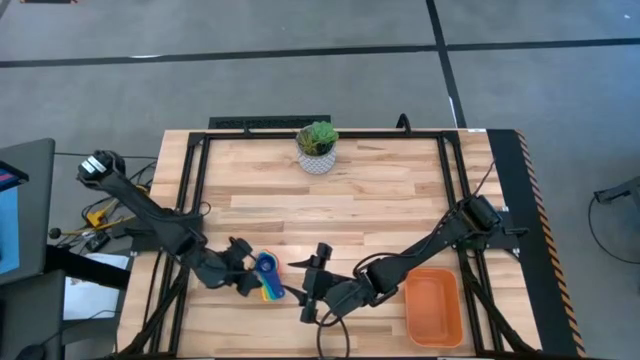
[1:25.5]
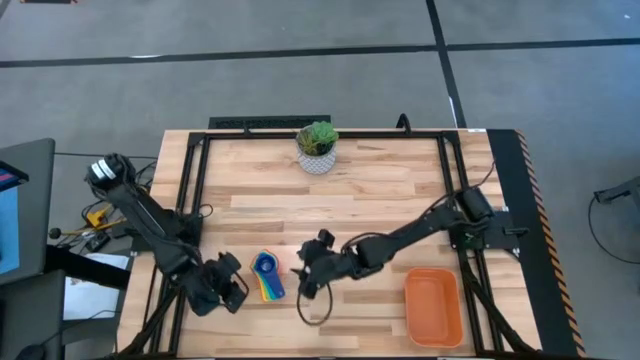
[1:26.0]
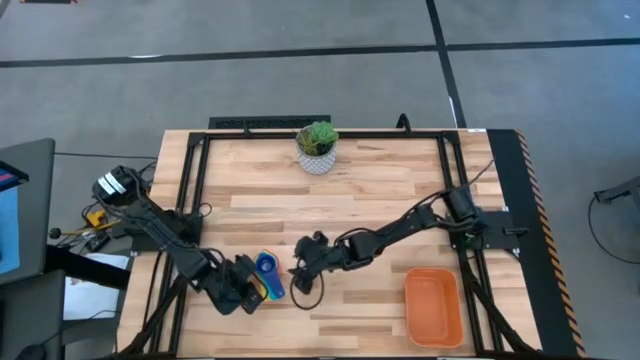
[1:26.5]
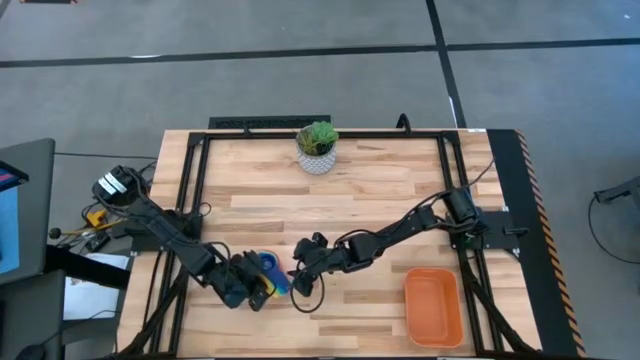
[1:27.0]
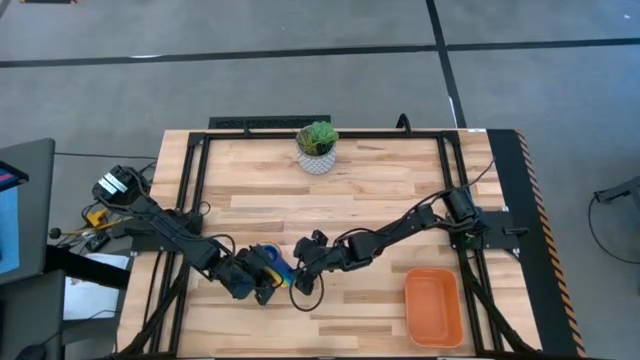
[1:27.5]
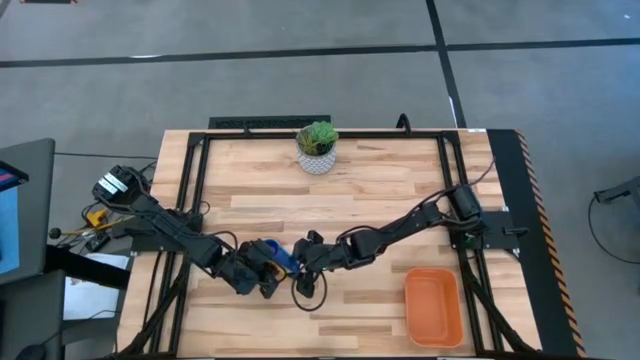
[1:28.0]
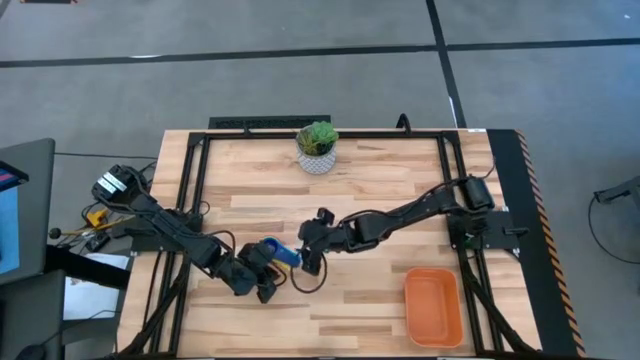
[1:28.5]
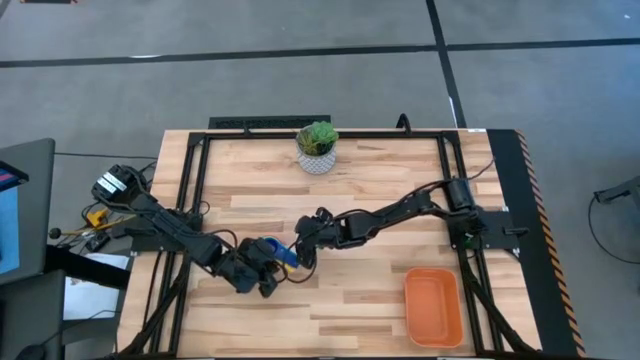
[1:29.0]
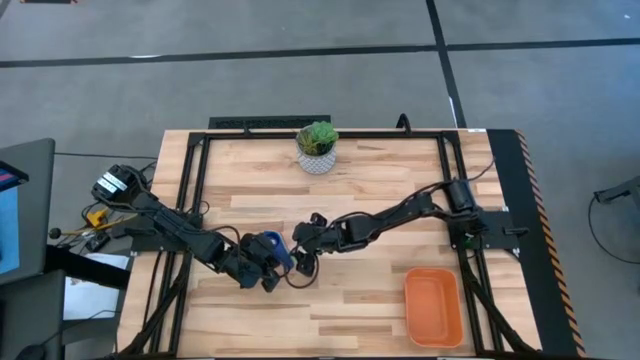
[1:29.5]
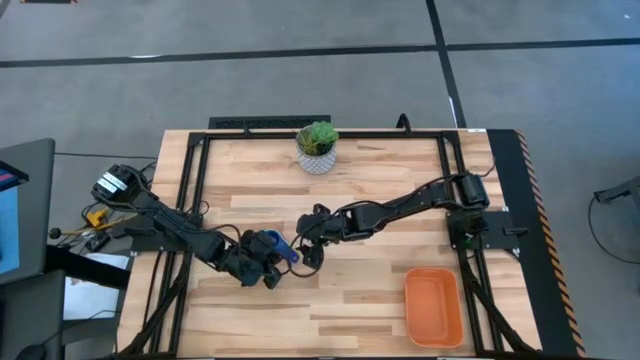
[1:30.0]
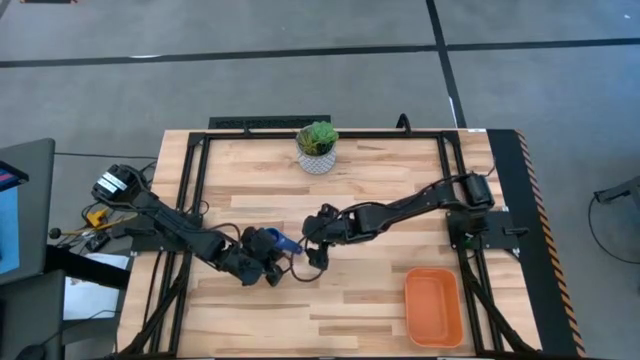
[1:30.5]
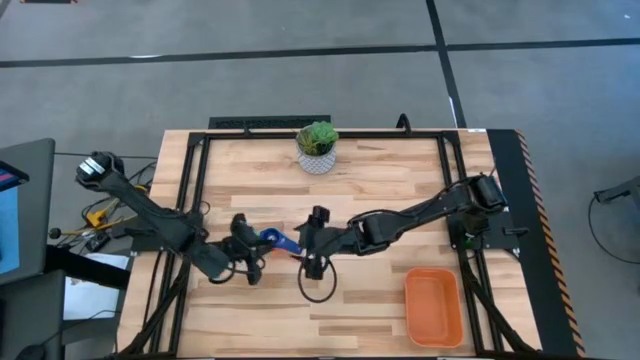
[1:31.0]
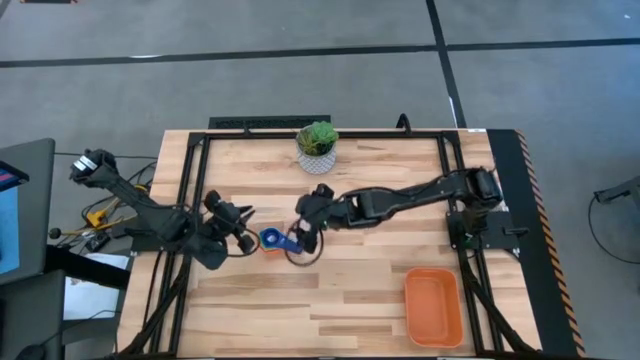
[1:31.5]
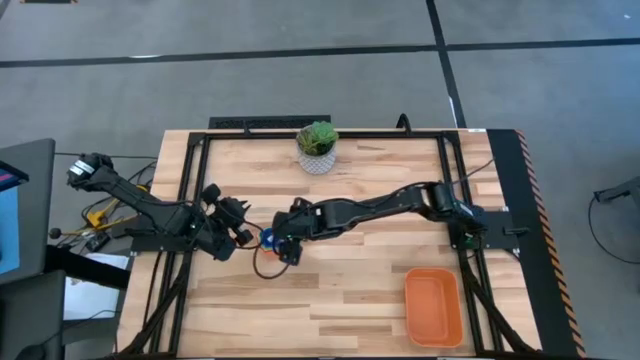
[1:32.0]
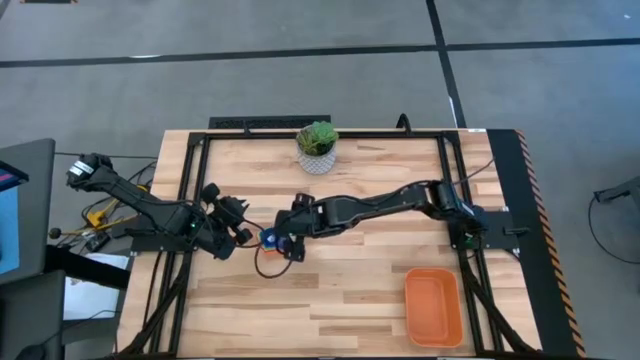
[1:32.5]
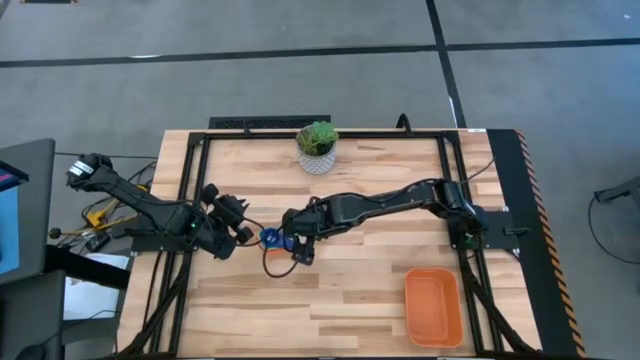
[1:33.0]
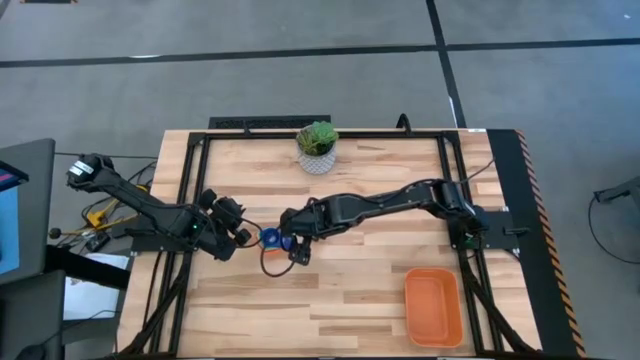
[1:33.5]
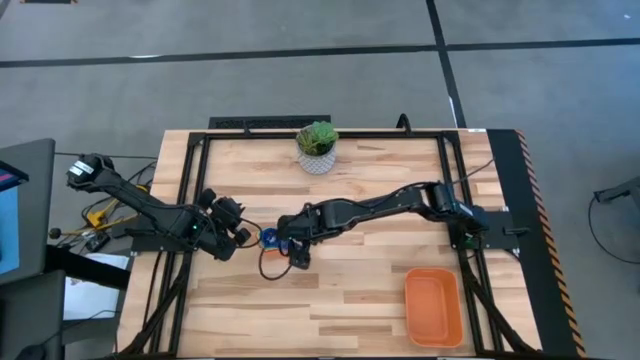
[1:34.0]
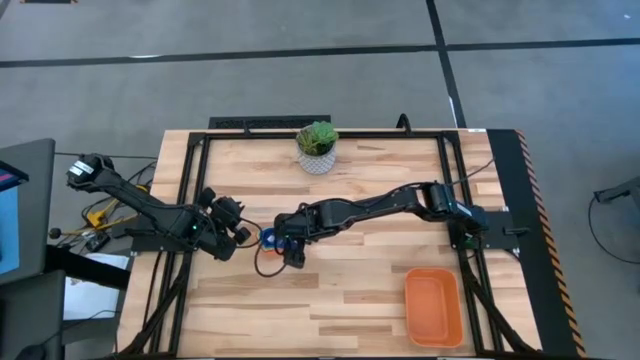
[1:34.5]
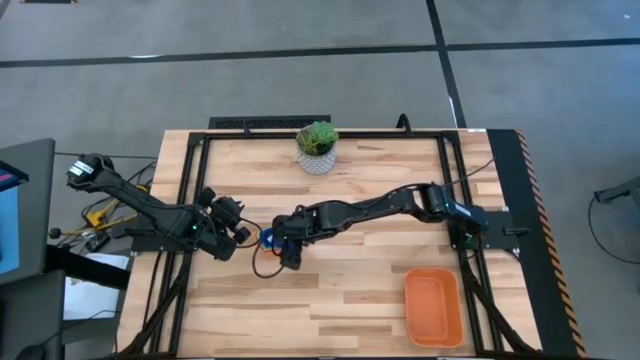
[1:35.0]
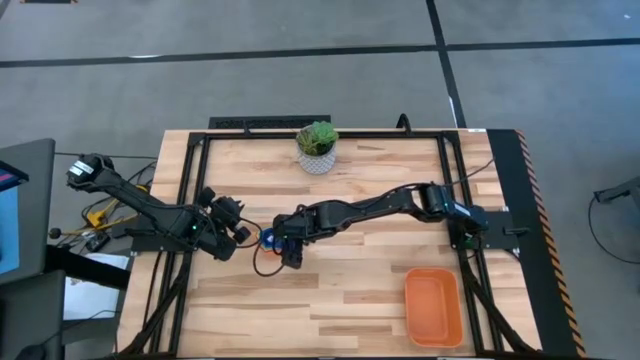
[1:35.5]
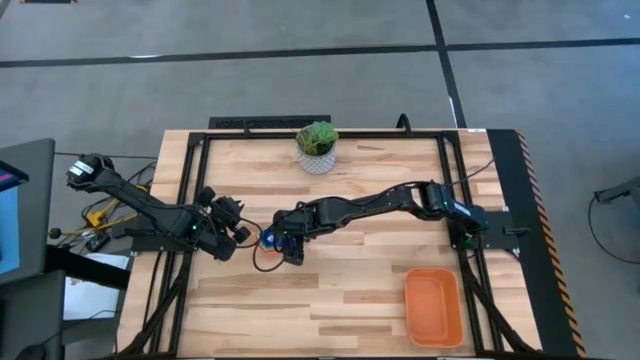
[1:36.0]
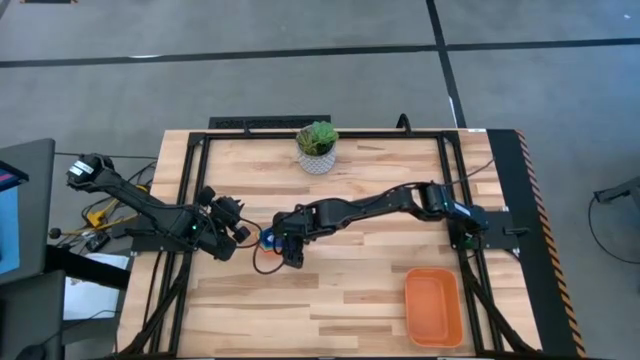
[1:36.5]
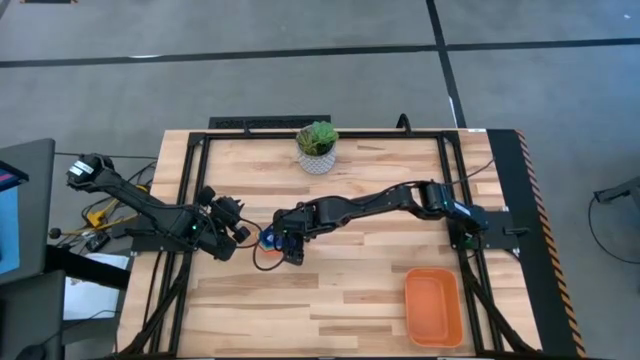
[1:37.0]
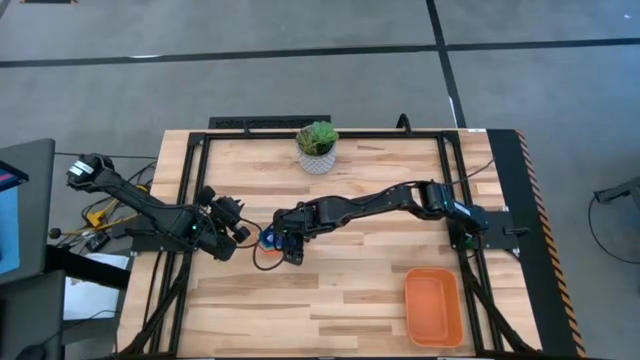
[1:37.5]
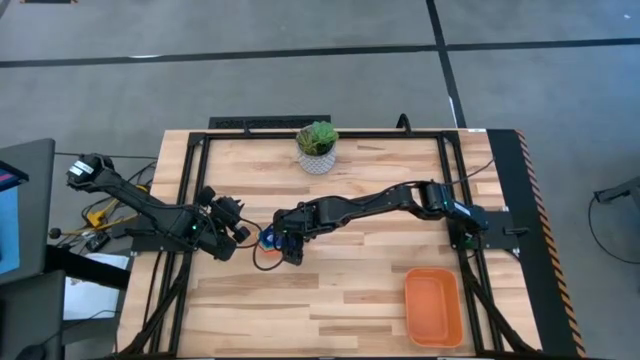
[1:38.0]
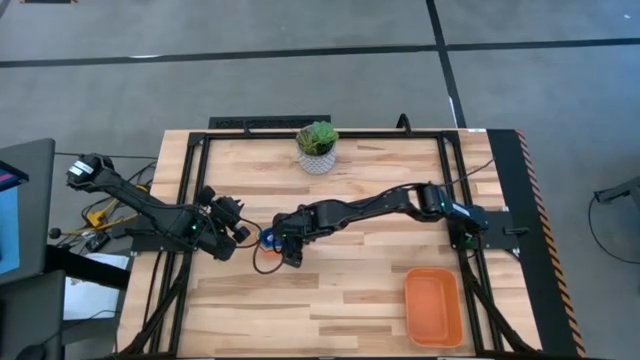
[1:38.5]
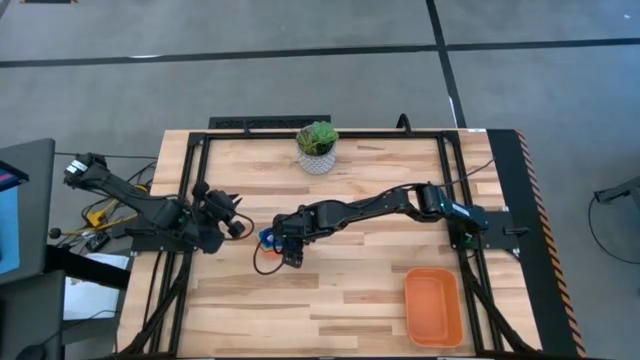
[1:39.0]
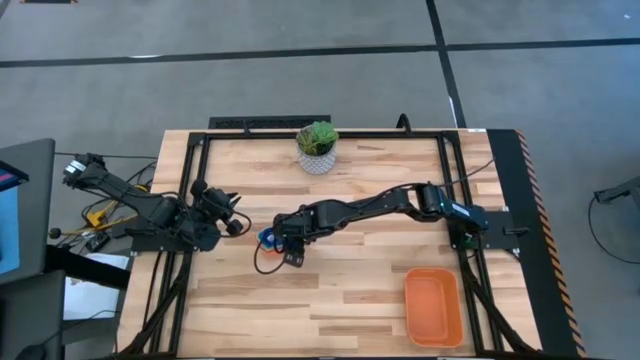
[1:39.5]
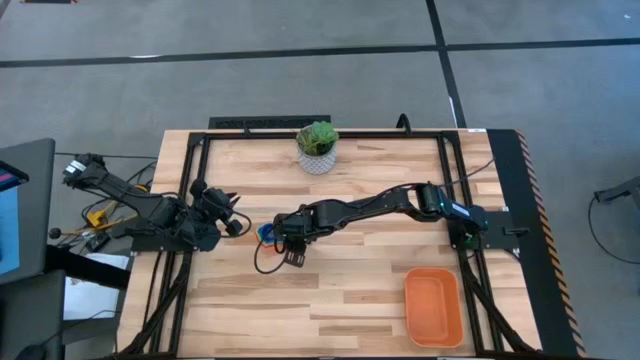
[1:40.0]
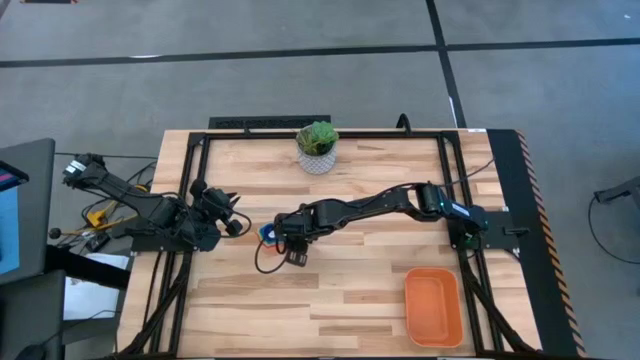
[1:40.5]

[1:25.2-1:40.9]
Task: Nest measuring cups in basket
Put the stacked measuring cups into the orange bin

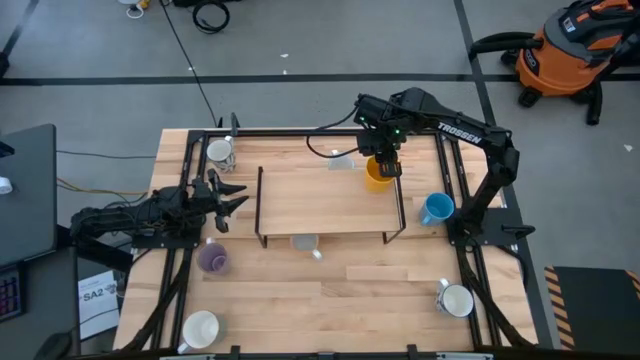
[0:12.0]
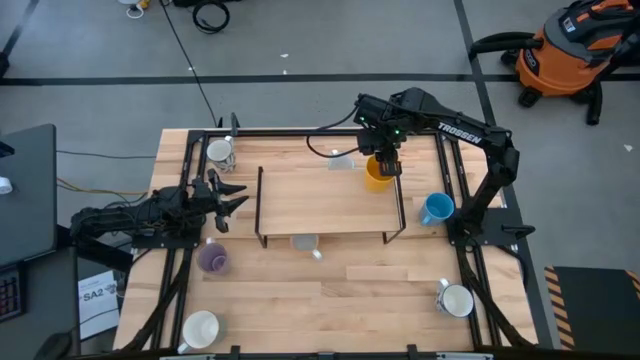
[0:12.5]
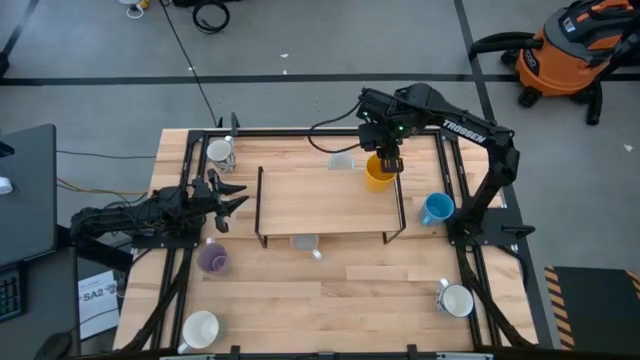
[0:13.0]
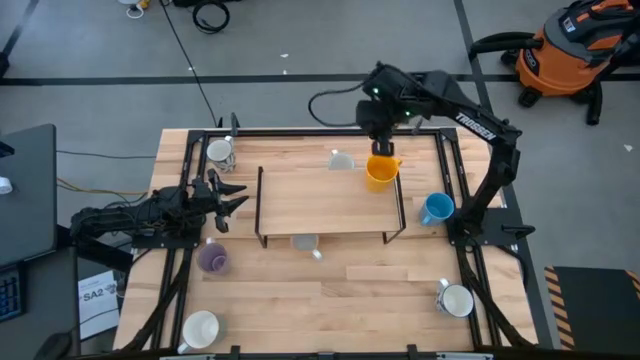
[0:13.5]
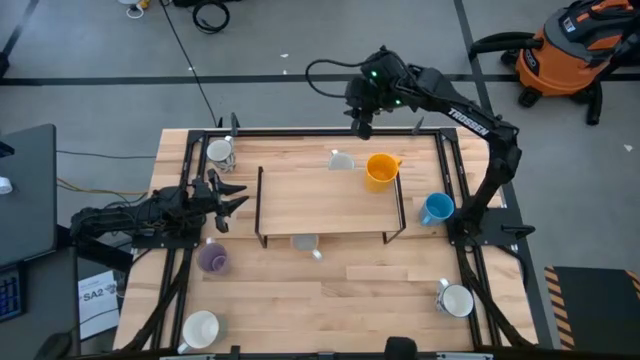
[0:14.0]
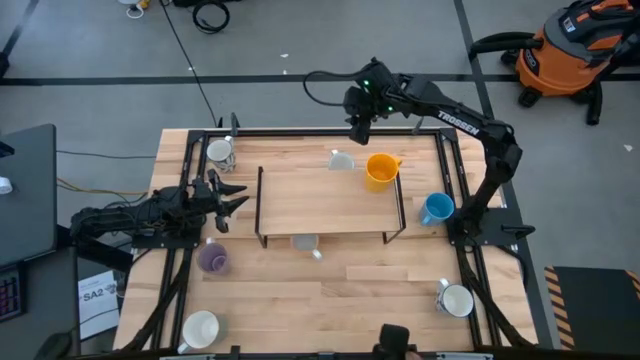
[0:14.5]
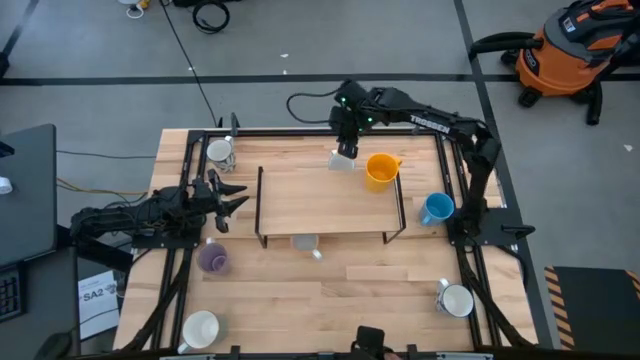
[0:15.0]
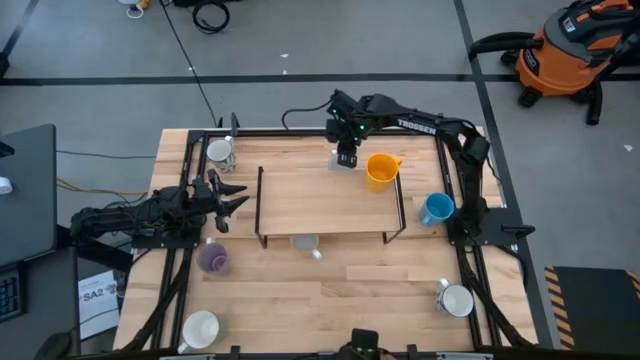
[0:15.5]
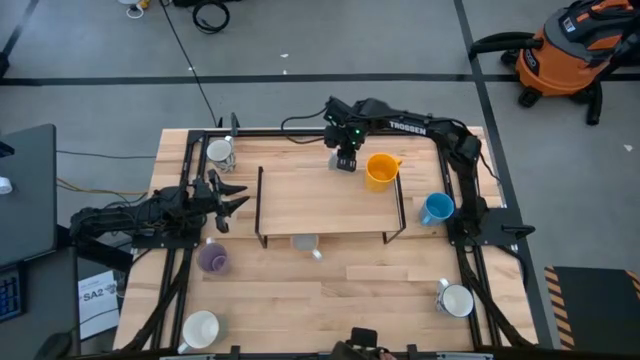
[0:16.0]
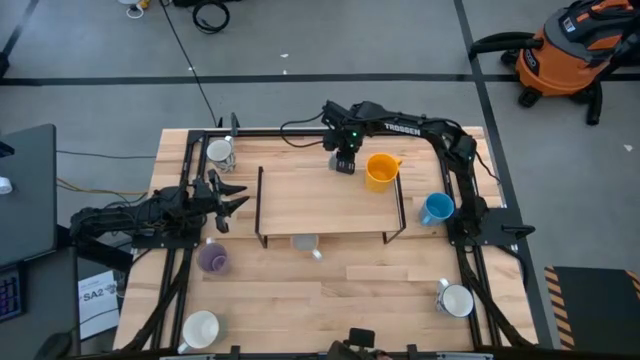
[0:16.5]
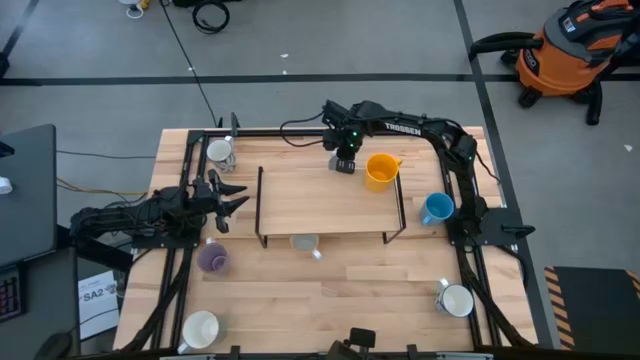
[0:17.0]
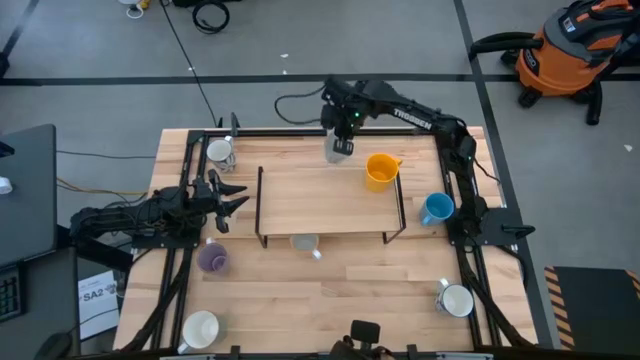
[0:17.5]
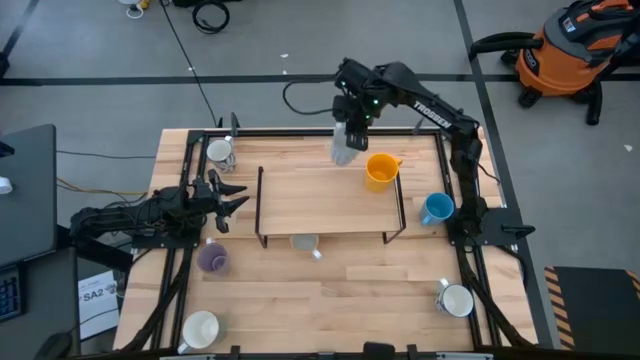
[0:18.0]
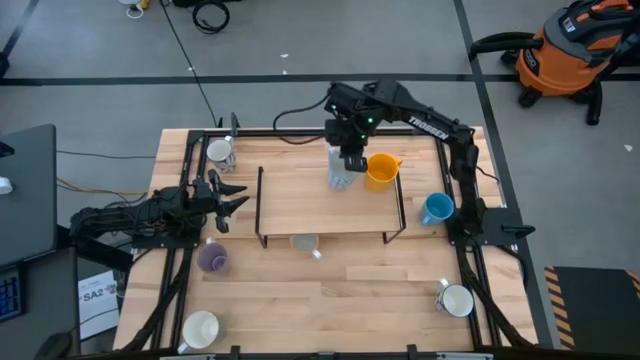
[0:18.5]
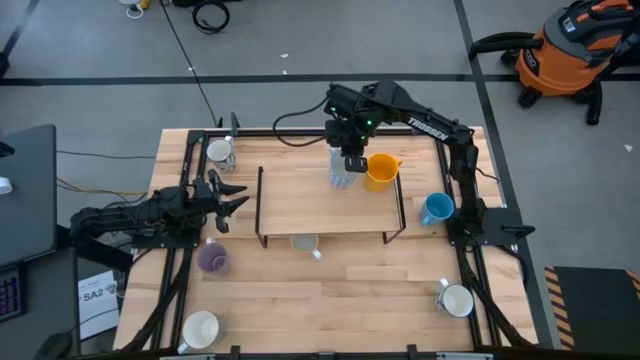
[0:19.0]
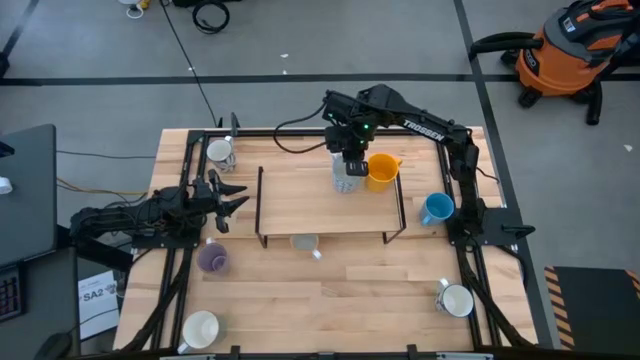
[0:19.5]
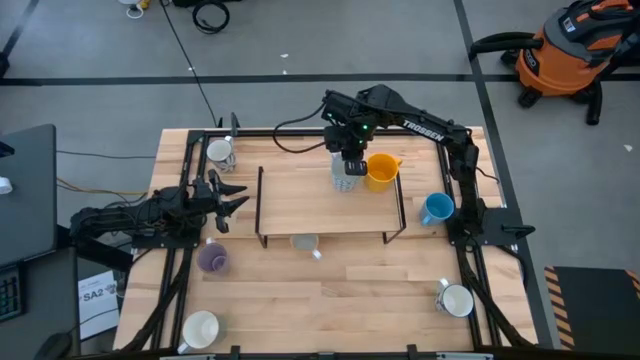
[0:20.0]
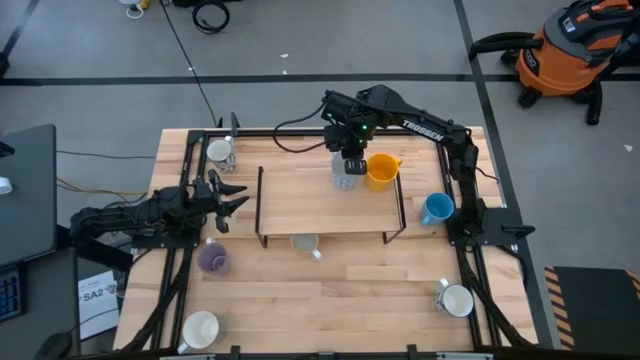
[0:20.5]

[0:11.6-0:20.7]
Task: Place coffee mugs
Put the green patterned mug on the shelf
